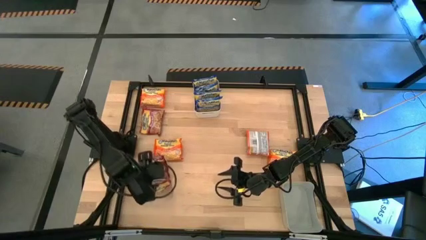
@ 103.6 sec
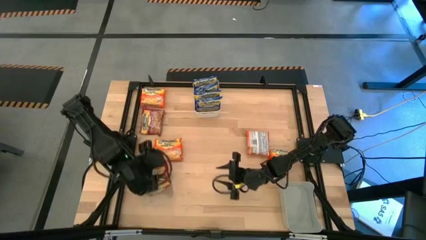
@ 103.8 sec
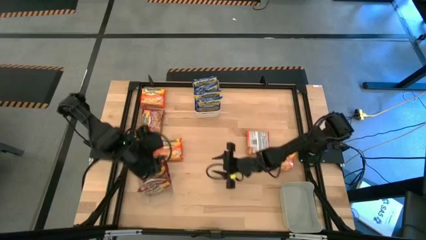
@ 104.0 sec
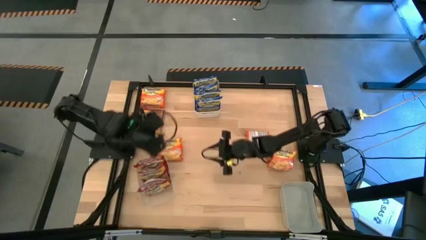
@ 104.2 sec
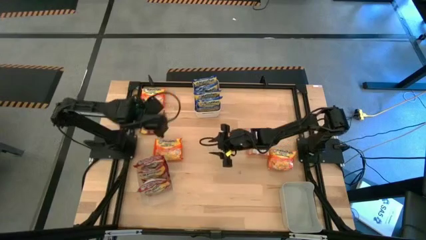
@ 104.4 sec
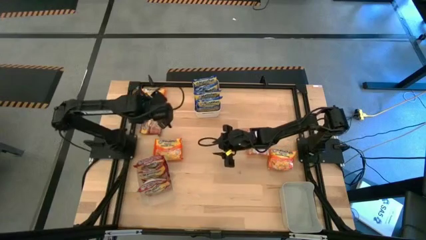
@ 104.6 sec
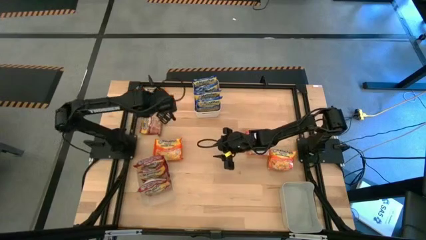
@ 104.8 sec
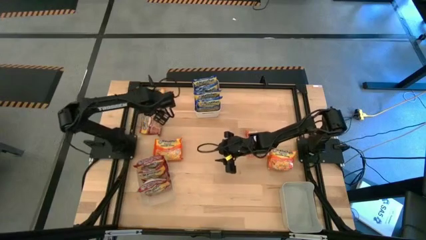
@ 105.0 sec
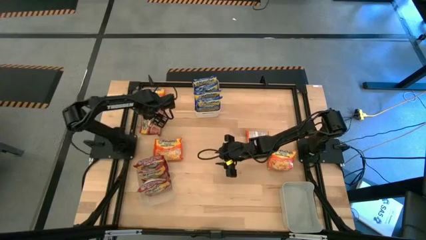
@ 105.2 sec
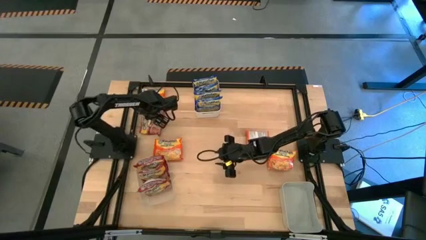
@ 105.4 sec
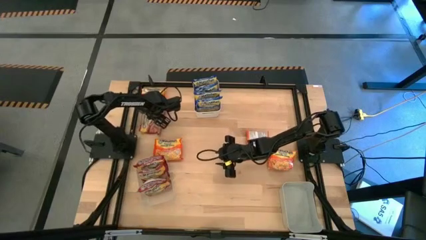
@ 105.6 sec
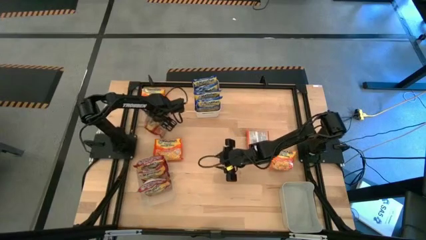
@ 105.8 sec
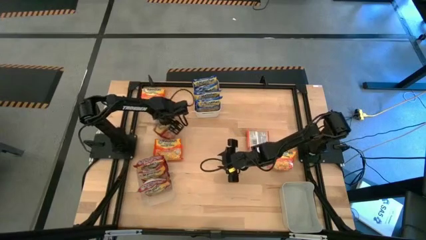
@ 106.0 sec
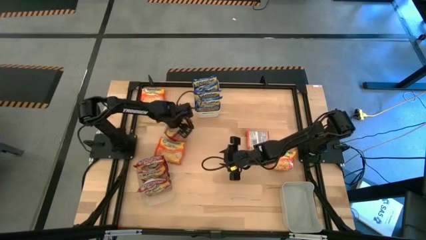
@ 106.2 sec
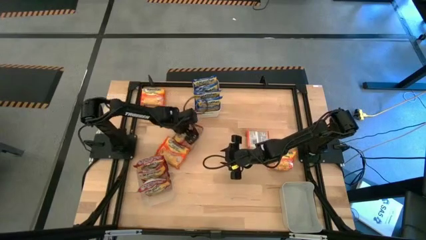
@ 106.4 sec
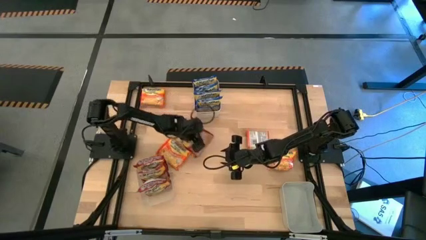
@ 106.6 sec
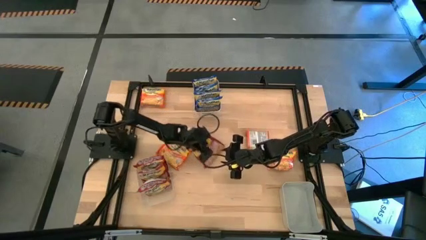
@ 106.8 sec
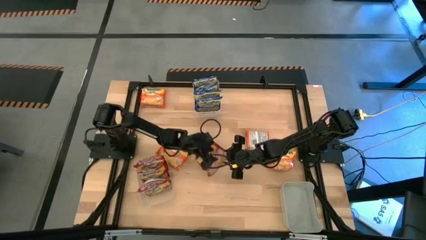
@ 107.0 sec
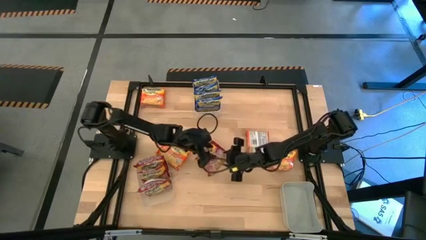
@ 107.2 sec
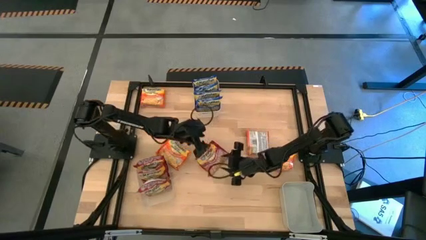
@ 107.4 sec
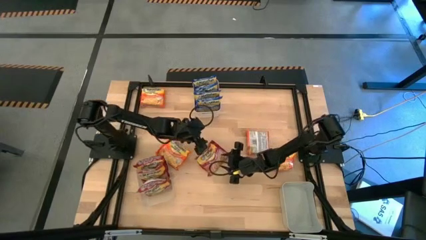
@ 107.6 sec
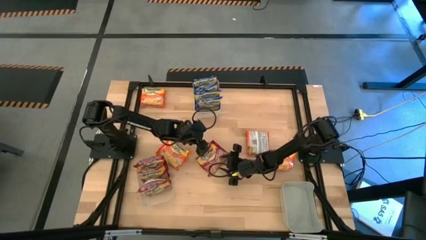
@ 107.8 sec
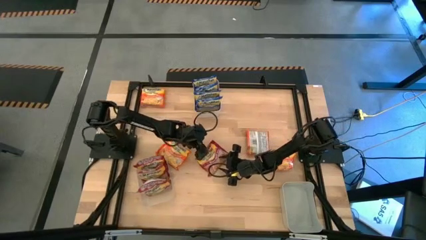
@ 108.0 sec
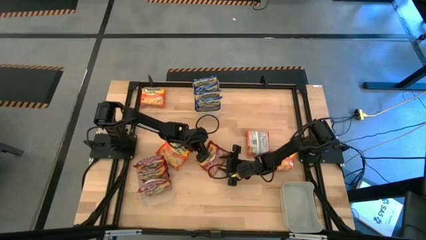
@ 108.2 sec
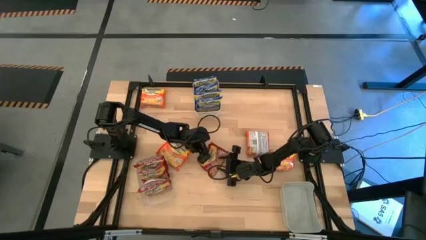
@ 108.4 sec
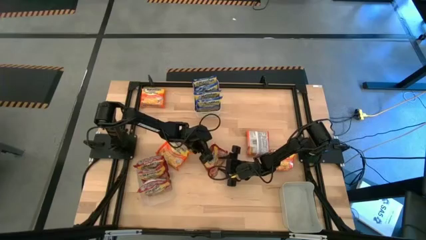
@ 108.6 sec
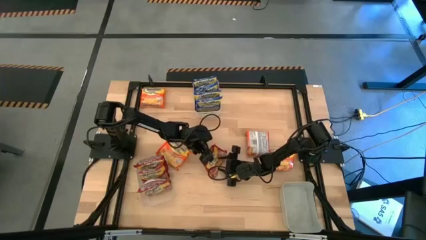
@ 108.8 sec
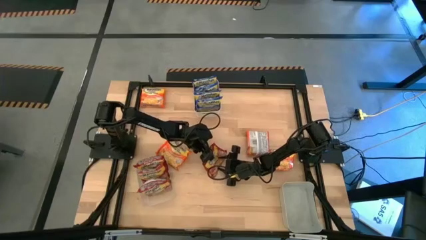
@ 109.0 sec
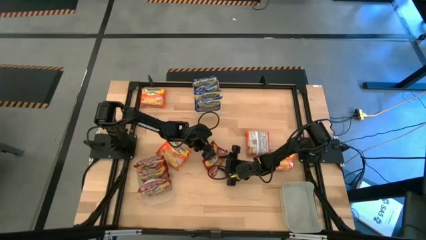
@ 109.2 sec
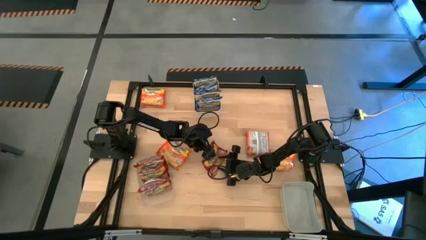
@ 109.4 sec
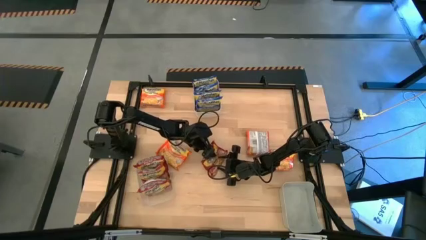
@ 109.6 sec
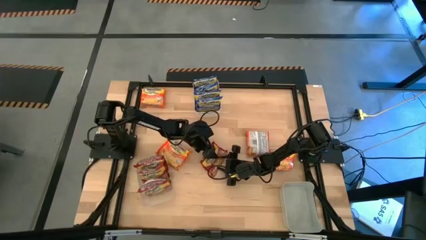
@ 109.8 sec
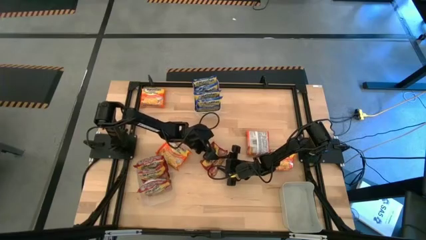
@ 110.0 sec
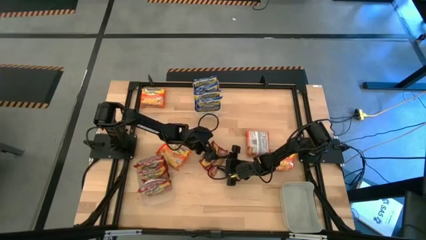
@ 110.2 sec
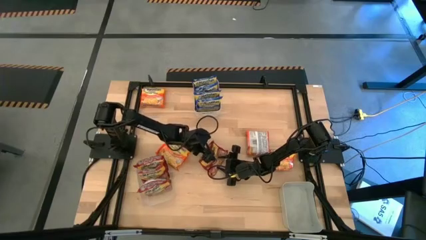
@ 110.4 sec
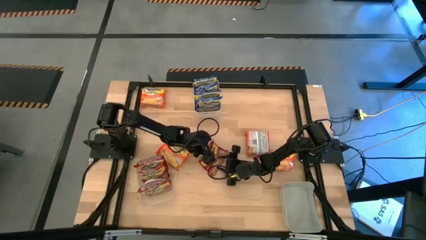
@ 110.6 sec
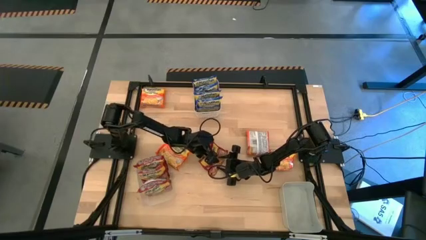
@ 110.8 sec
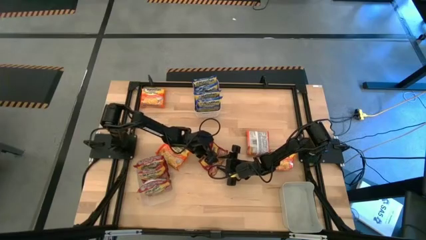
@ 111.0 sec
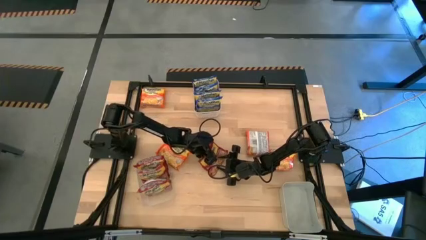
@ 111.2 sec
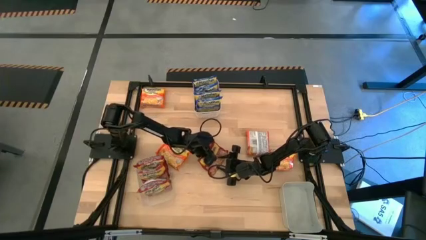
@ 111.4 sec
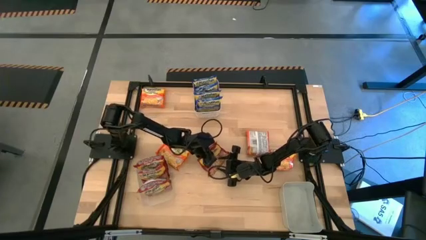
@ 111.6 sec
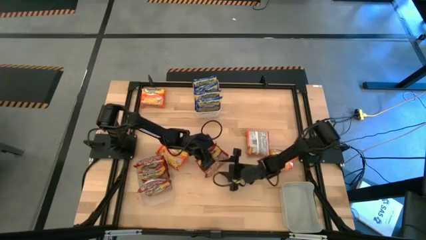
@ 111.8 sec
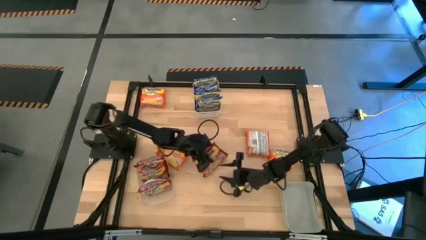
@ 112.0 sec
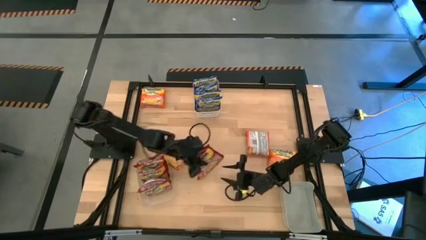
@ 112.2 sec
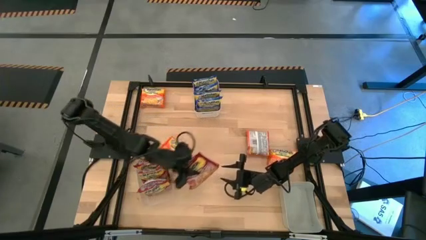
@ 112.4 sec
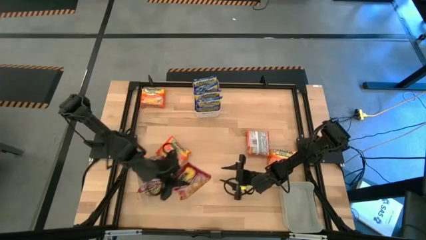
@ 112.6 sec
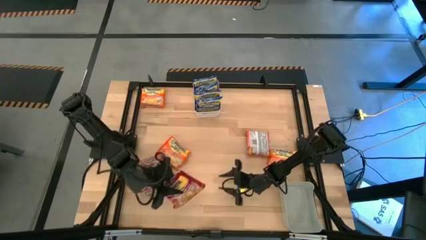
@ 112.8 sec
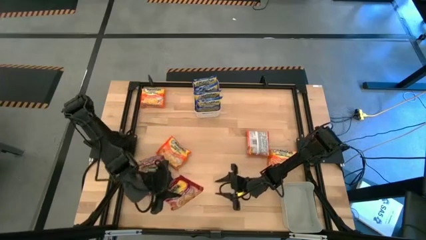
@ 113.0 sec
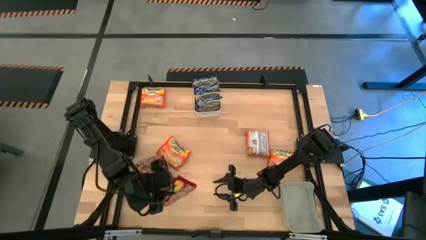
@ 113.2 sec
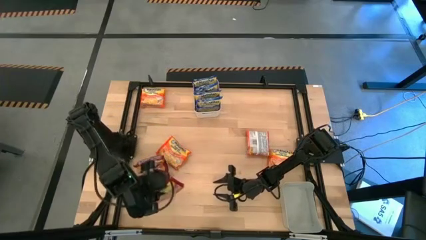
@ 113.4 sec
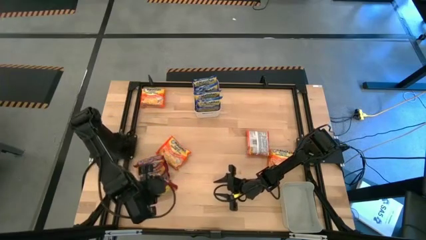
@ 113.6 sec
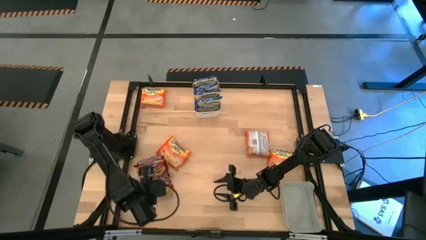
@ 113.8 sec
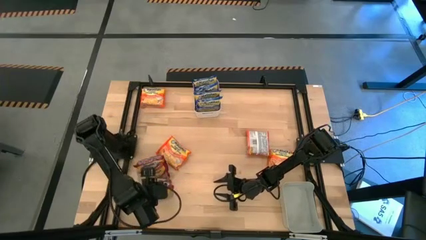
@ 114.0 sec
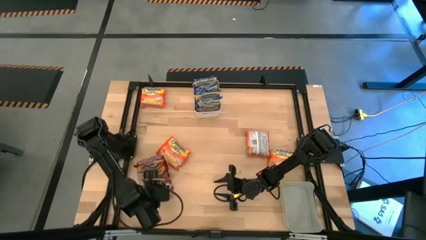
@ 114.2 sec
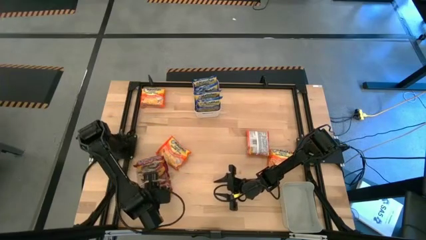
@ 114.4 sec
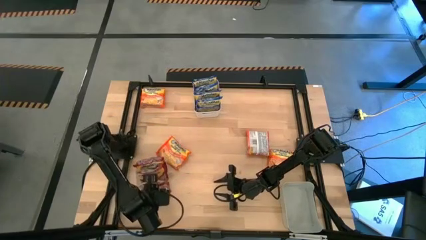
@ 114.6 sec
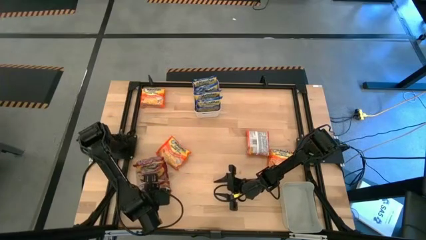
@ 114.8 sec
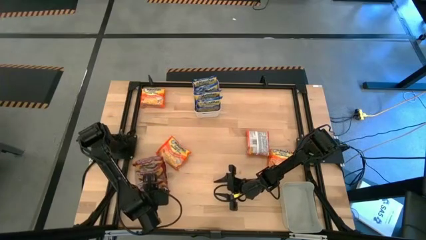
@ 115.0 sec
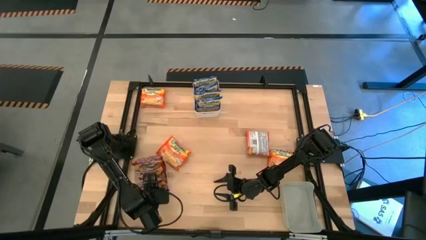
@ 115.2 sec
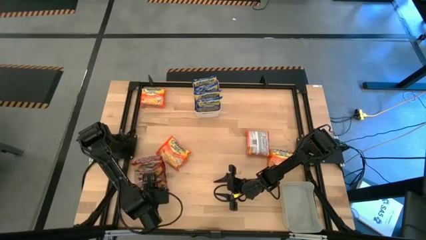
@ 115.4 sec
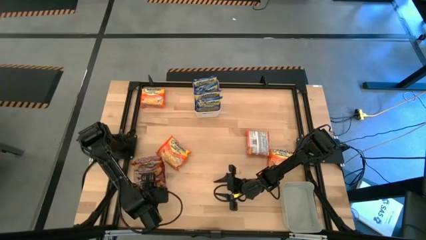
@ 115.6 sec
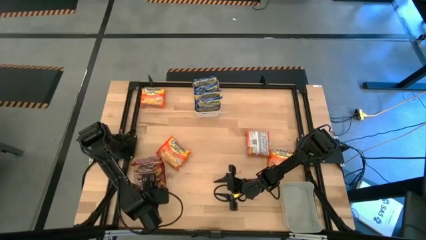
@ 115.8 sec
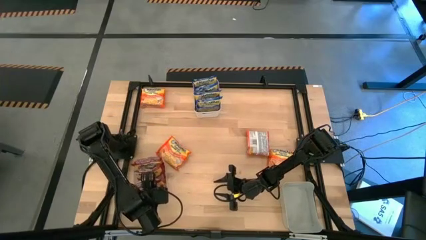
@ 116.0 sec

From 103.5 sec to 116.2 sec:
Task: Sort Maruchan noodles
Put the red noodle pack into the transparent bin

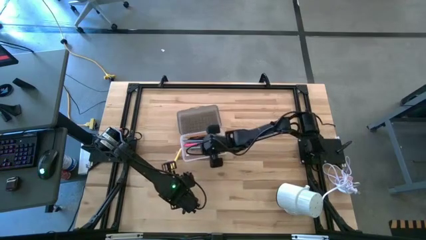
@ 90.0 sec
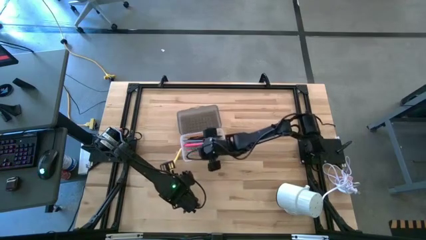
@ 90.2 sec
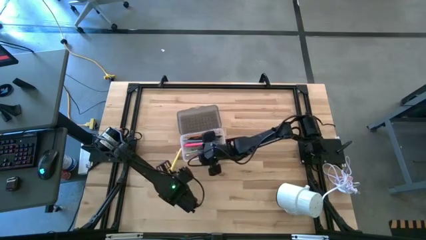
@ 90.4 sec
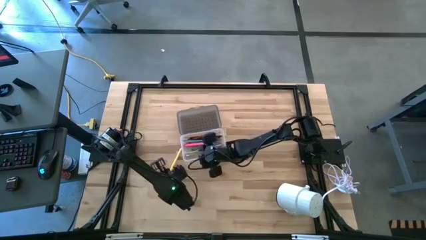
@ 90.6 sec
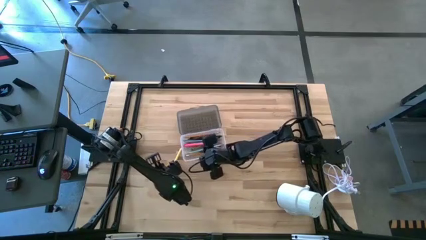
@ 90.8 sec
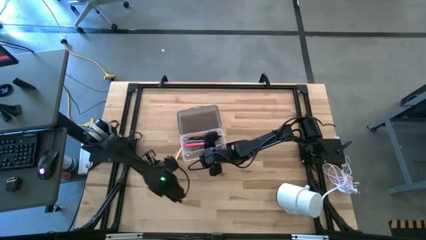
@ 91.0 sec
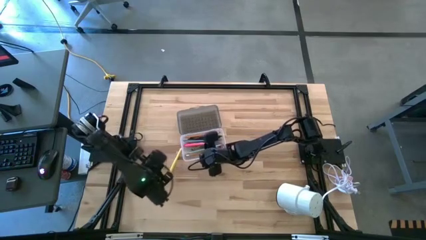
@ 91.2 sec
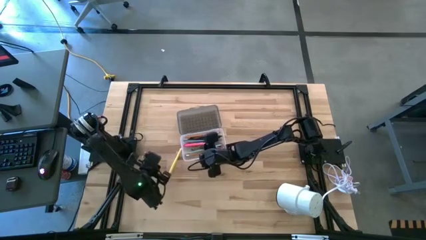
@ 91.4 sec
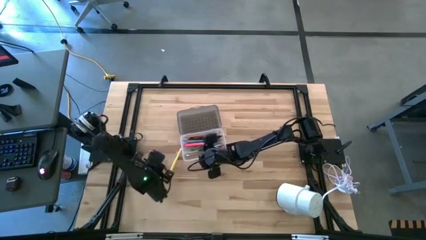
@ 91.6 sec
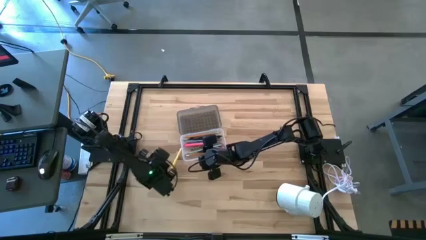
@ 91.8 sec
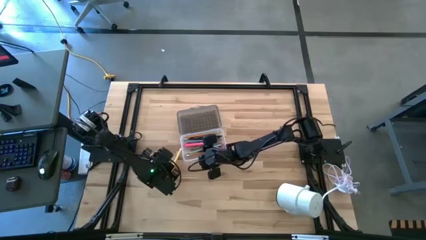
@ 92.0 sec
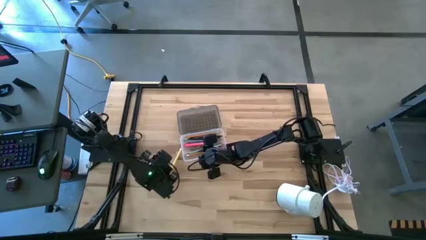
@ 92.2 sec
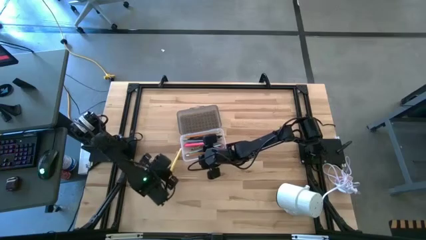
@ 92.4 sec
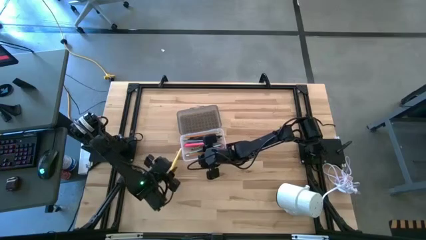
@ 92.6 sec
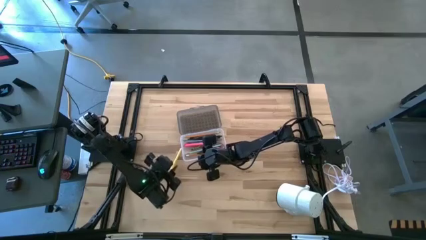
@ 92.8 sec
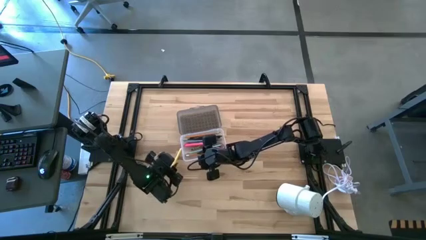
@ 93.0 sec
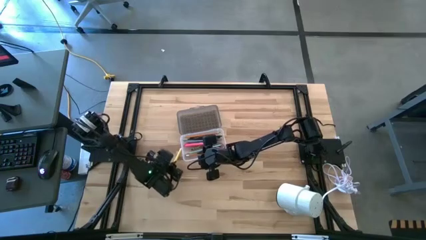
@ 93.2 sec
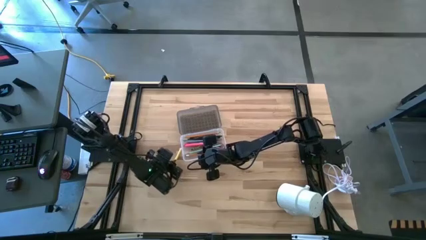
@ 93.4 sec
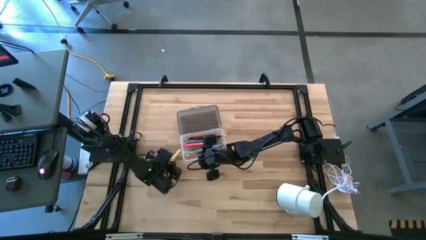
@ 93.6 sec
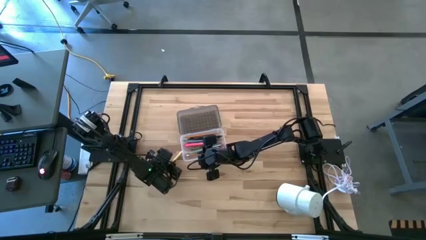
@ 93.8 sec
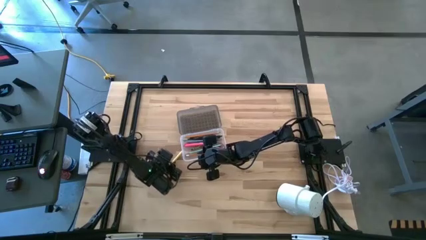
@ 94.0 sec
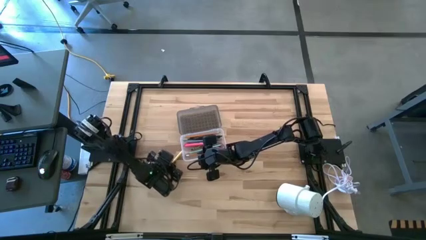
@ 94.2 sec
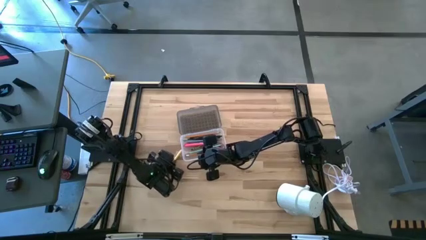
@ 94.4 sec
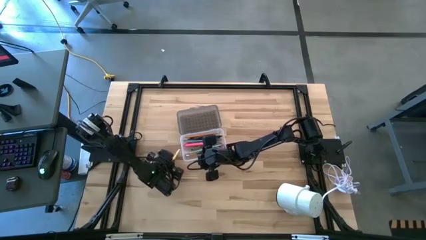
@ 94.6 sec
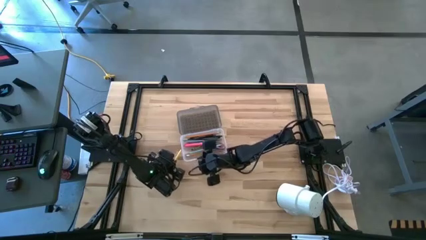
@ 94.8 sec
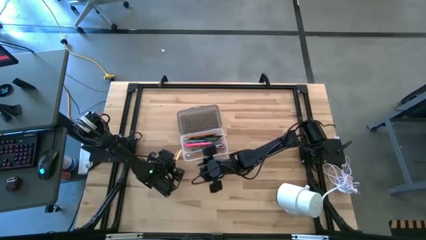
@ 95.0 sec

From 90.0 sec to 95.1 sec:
Task: Pick & place school supplies into a supply box
Put the yellow pen into the gray supply box
